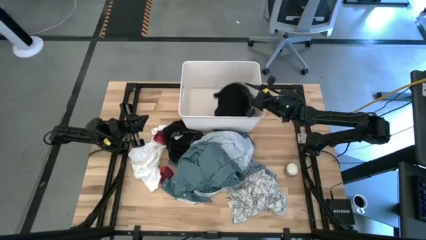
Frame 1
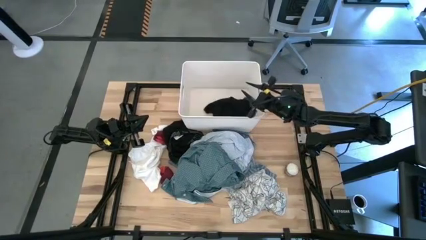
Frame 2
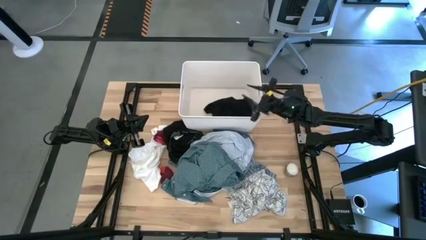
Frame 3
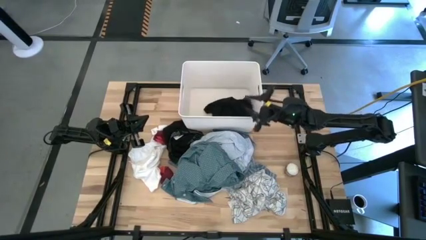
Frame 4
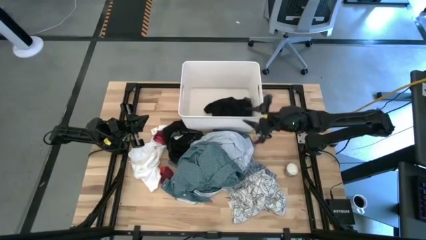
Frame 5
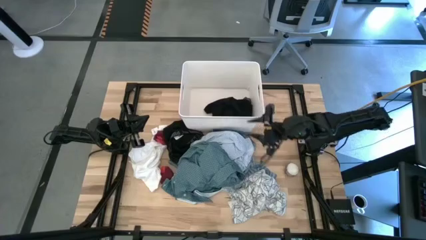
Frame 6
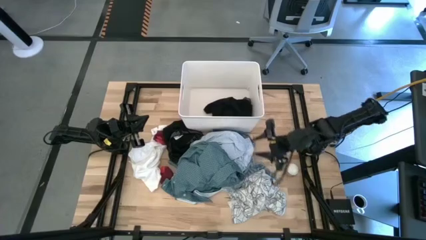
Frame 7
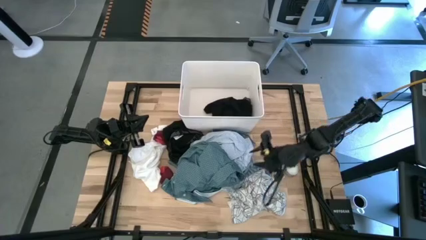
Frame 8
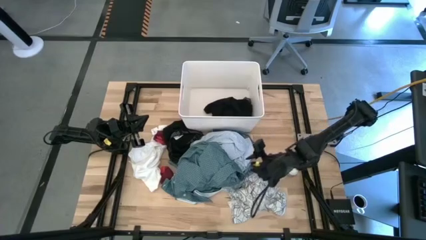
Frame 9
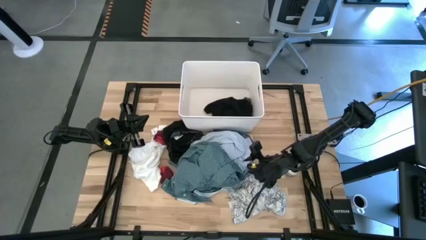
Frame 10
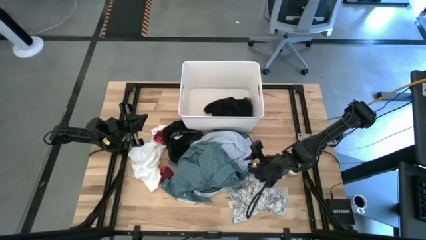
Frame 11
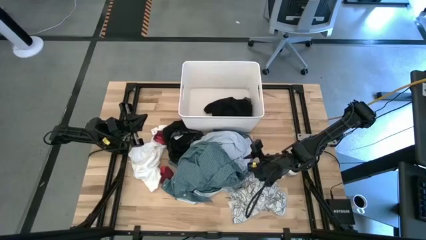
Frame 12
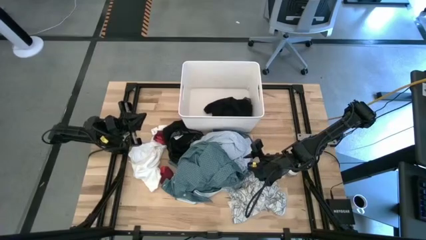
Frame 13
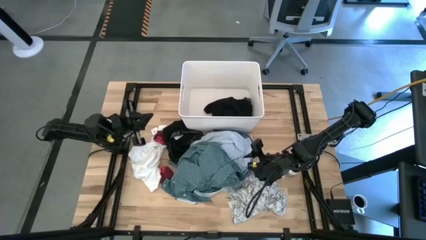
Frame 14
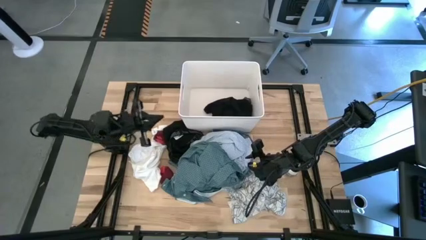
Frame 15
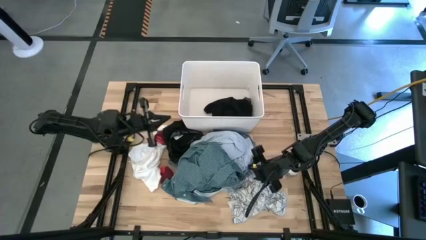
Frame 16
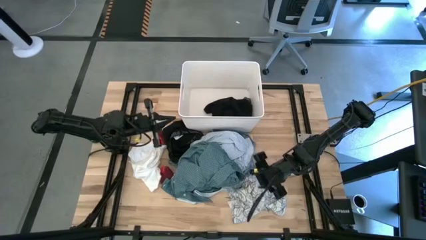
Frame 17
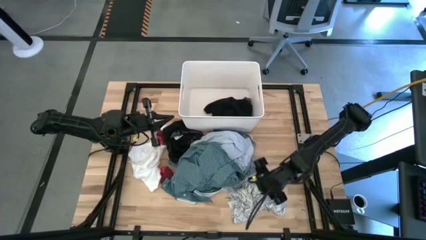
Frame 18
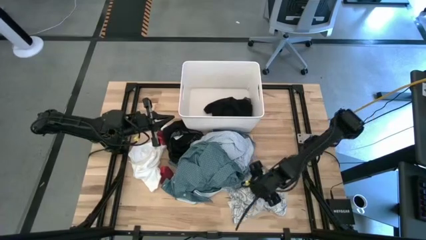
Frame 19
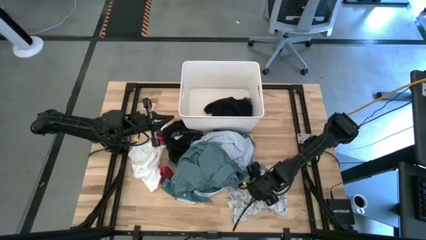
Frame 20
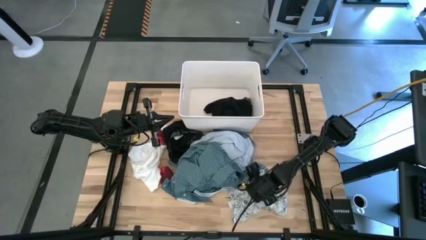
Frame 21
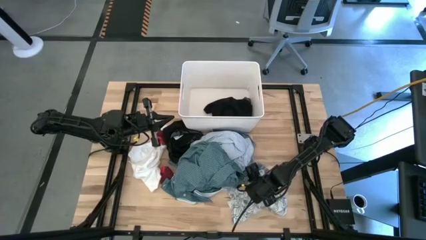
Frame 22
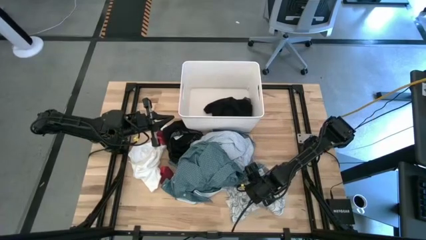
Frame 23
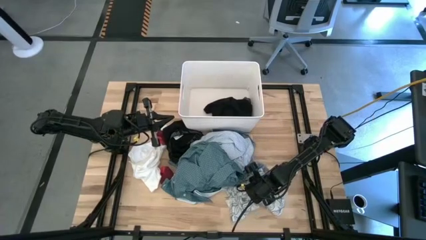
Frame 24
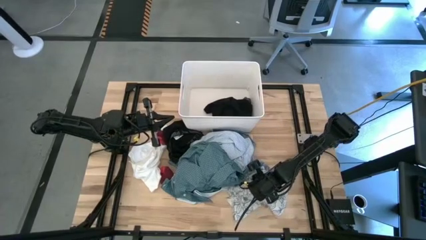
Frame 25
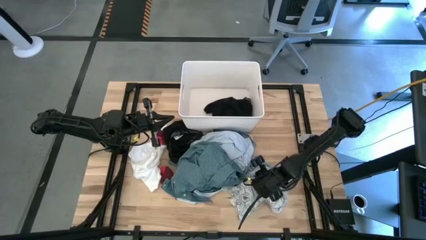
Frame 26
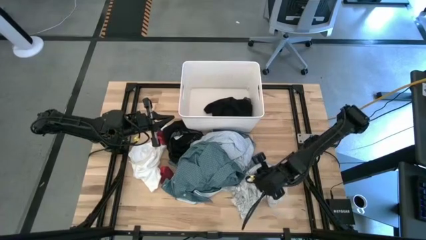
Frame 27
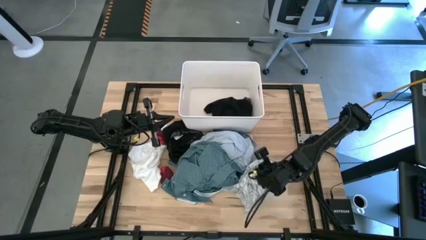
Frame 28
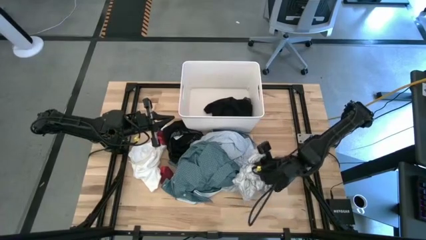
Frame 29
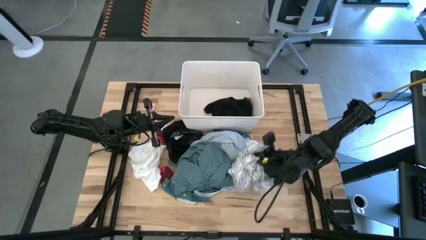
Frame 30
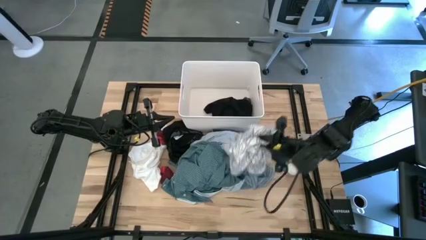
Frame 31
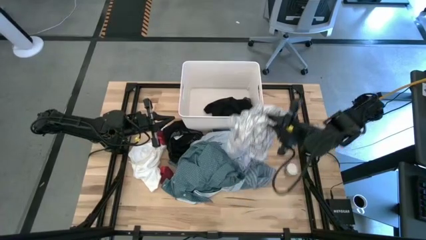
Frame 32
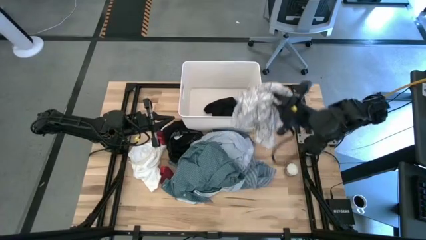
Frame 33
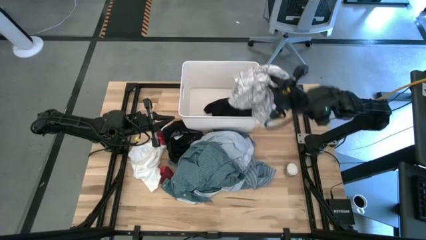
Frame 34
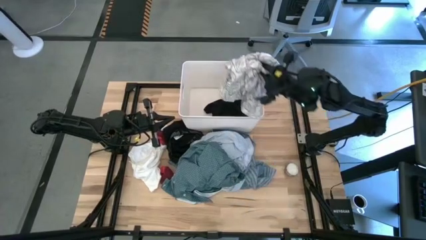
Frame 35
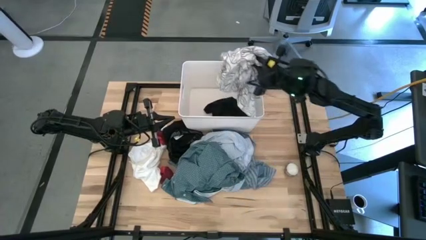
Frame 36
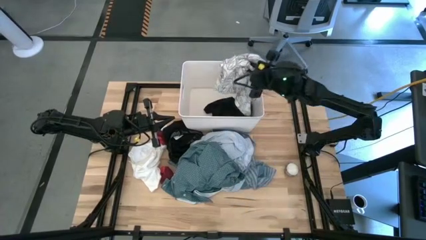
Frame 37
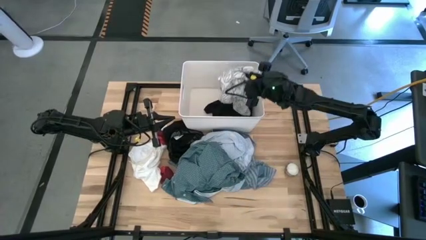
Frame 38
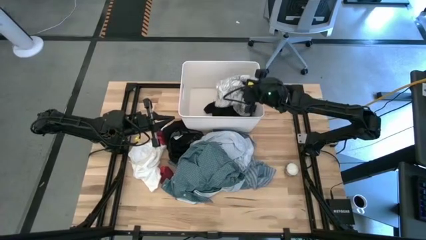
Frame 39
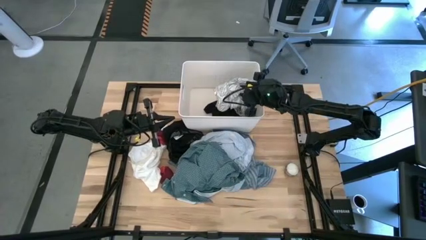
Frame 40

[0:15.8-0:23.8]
Task: Sort clothes
Put the white pattern shirt into the white bin

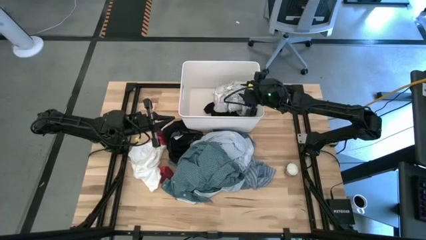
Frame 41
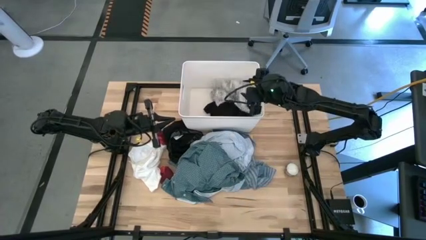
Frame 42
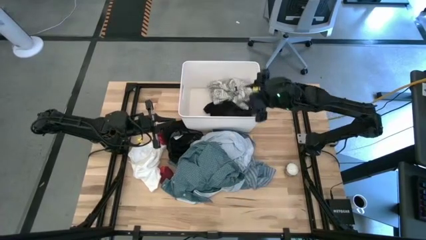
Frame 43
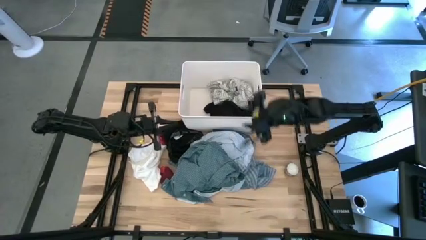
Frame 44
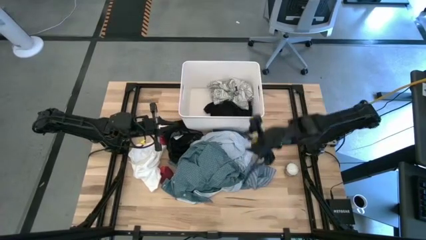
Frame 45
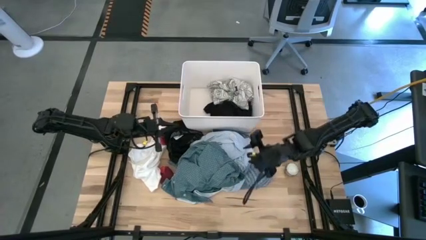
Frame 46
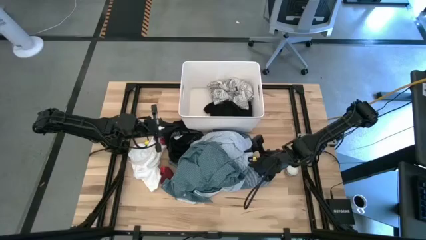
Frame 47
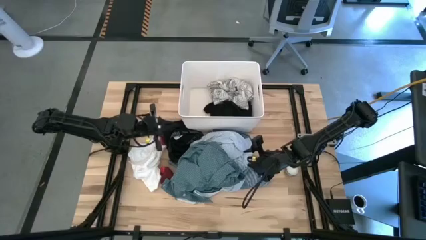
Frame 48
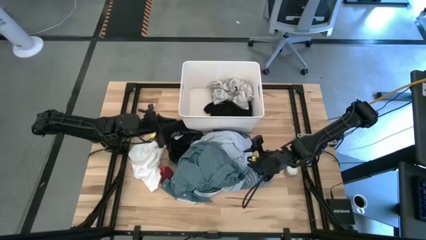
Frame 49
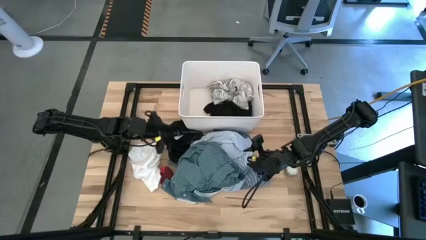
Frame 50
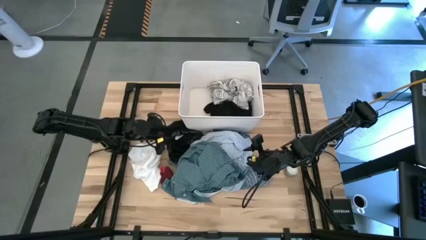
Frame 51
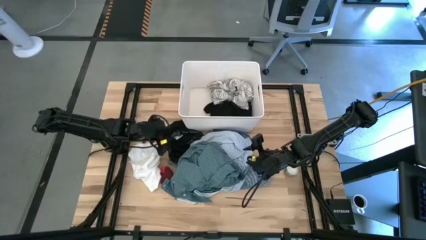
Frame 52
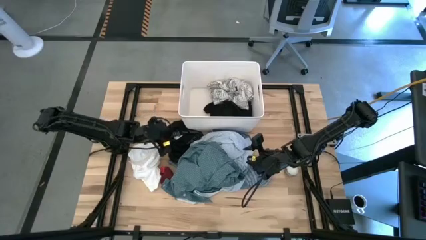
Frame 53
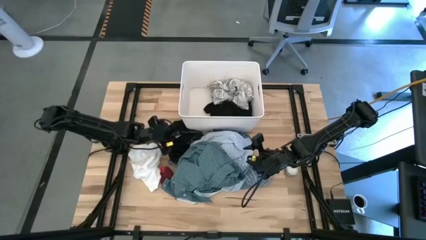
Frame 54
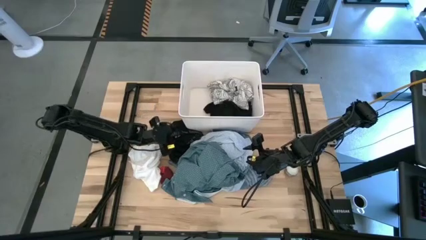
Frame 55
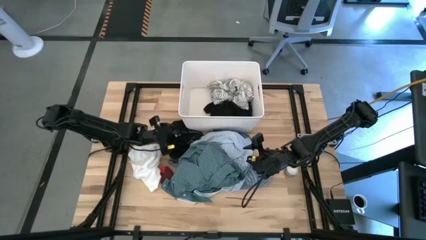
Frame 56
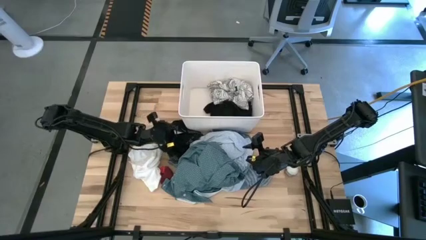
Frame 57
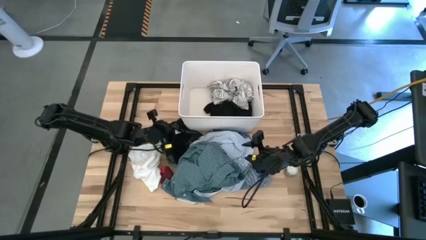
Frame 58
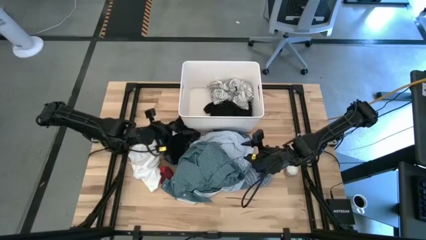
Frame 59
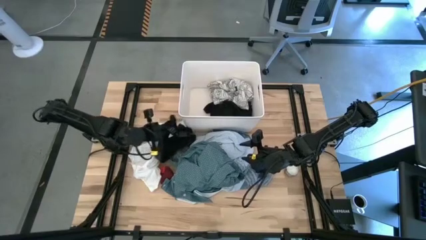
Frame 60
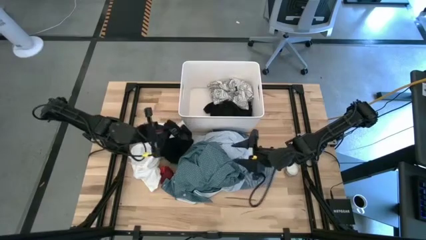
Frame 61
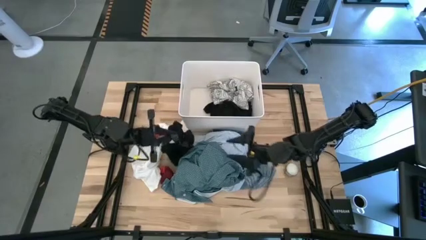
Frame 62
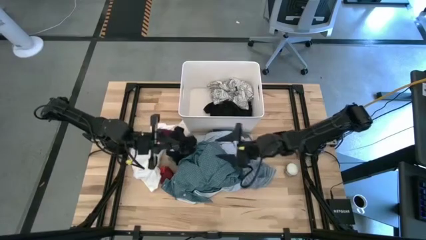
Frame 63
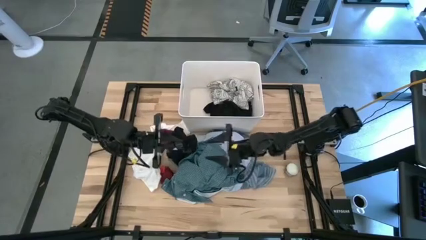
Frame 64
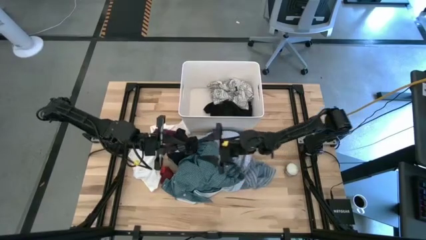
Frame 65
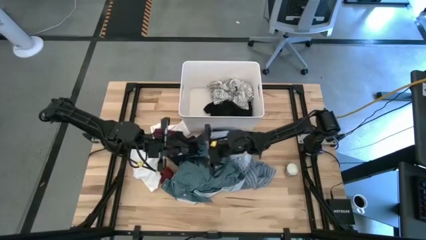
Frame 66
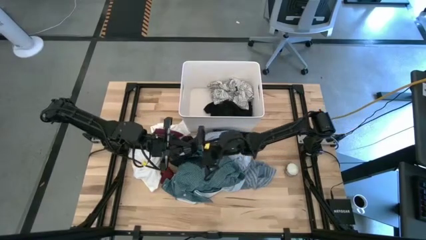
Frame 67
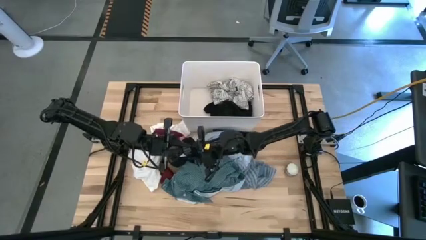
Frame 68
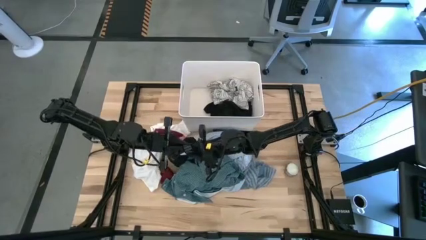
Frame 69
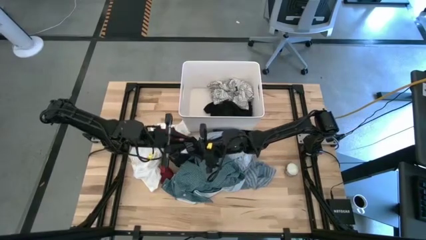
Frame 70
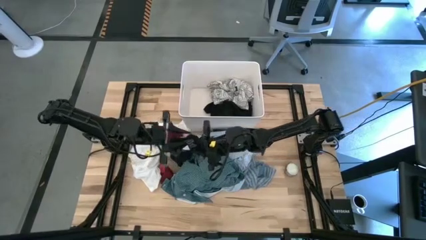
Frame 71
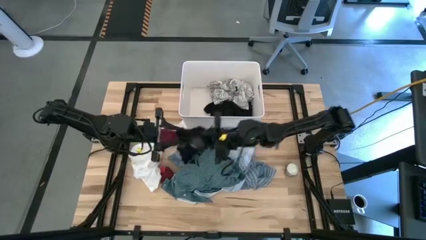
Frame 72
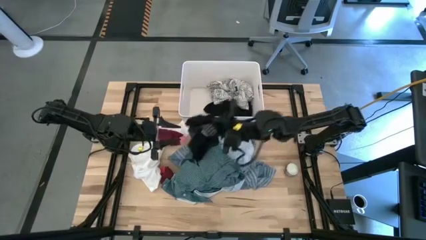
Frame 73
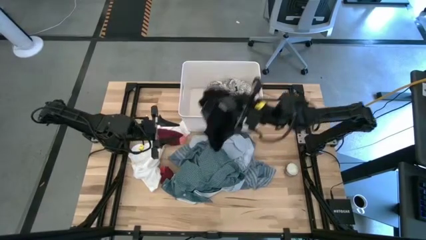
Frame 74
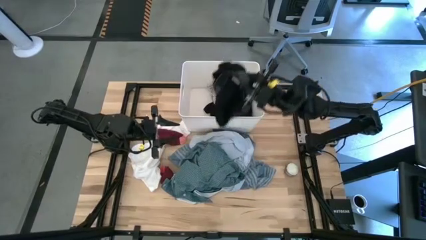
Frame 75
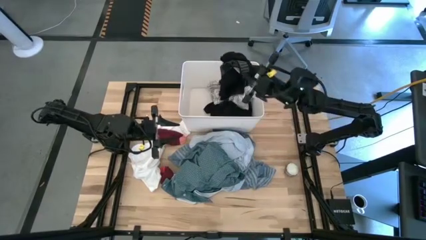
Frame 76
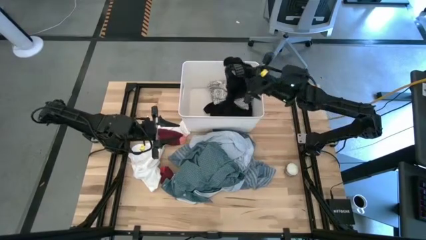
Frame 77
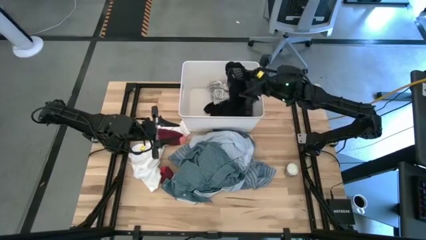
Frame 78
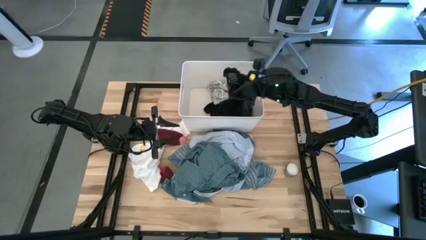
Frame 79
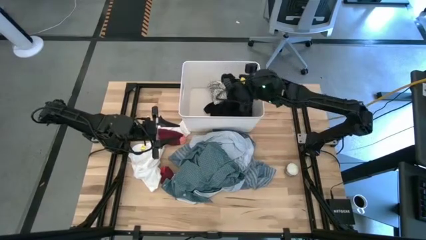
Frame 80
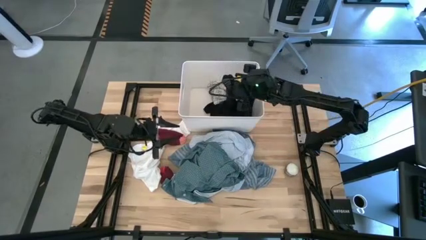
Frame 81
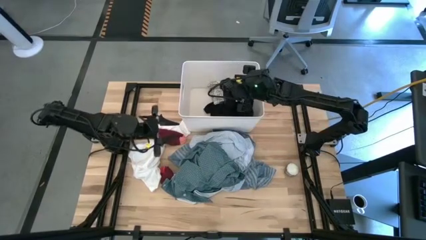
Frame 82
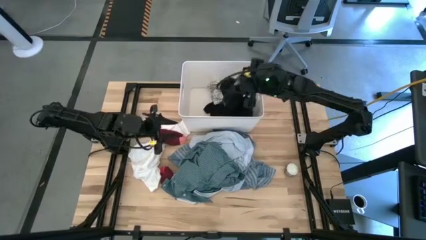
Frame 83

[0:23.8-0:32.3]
Put the black boxer into the white bin
